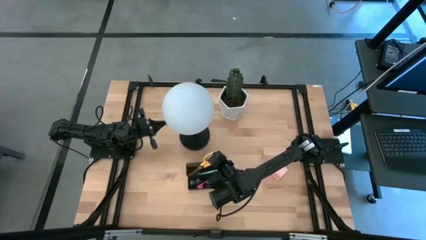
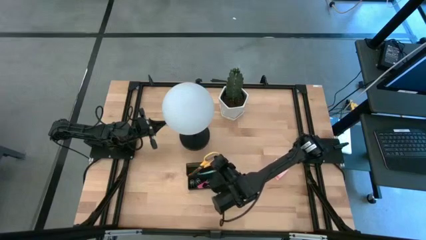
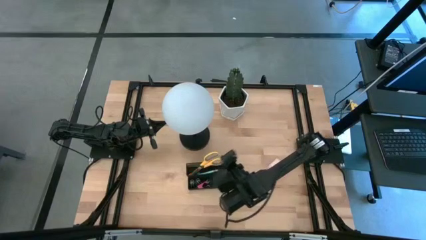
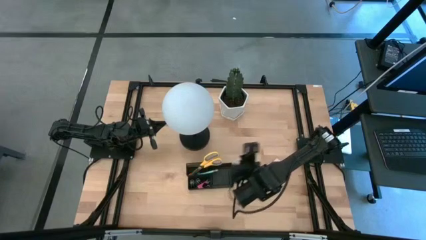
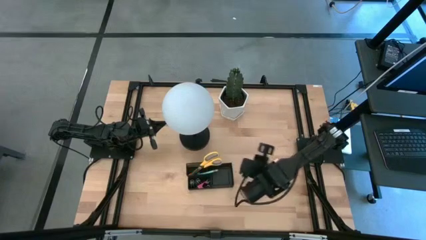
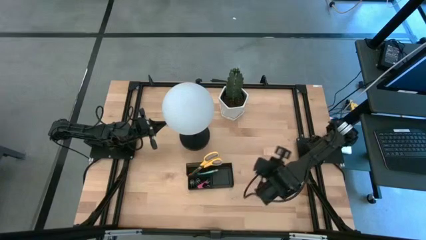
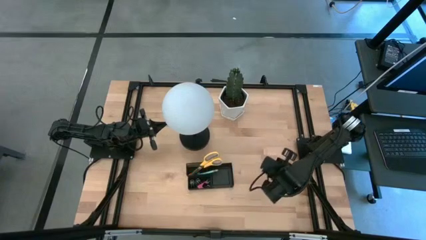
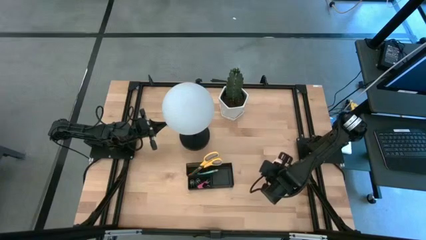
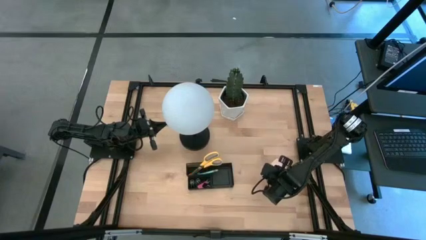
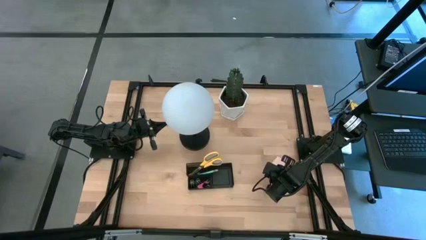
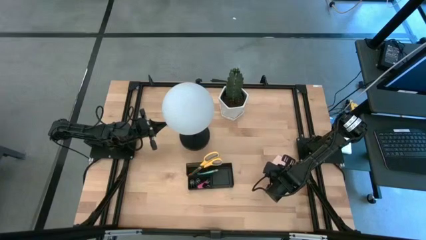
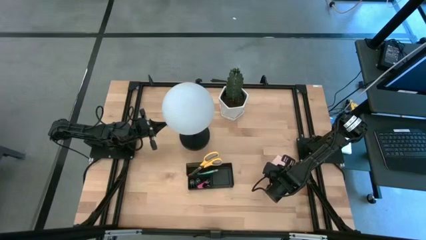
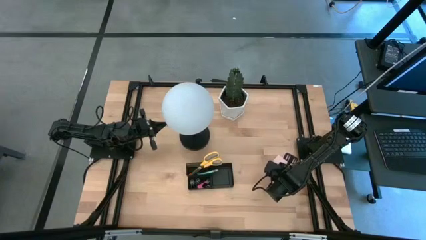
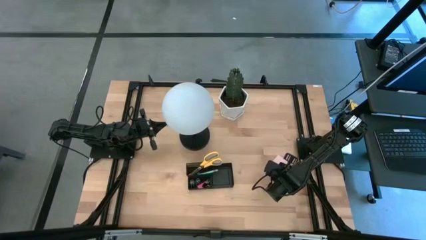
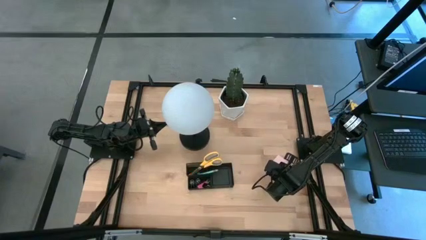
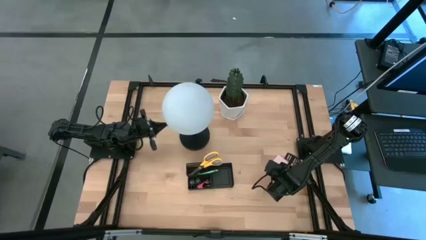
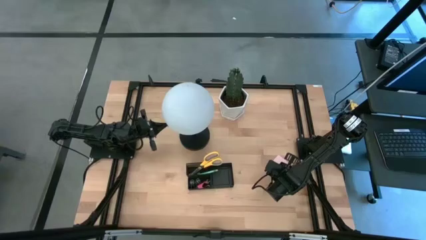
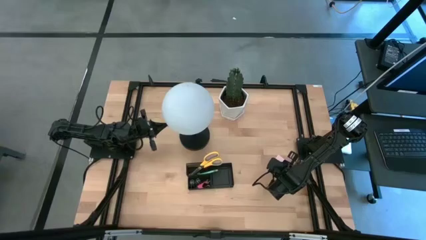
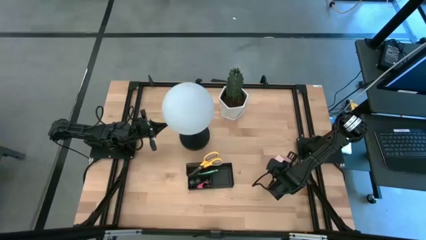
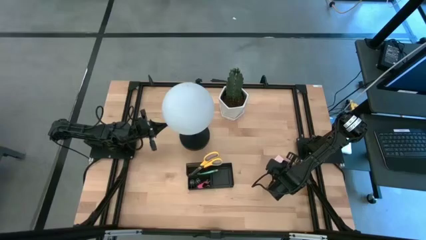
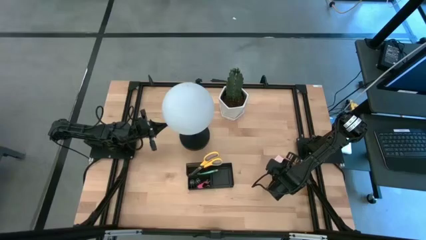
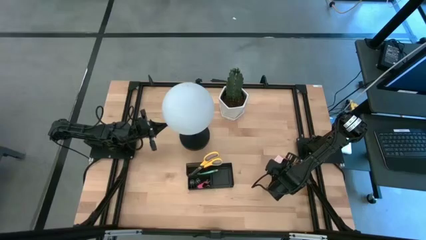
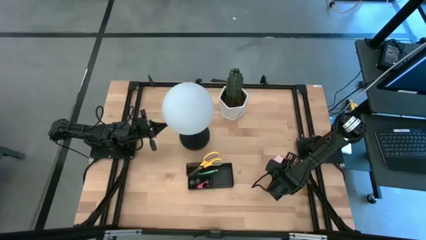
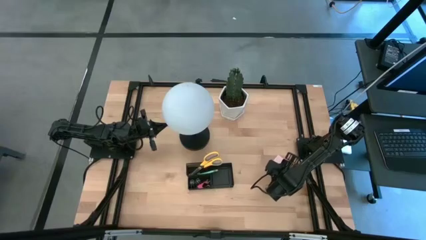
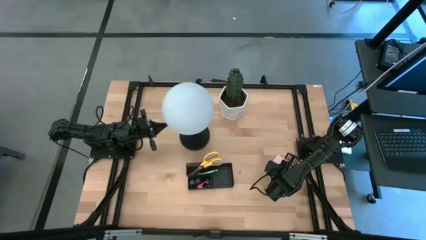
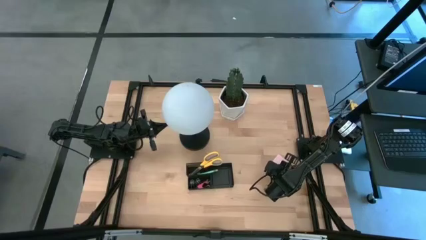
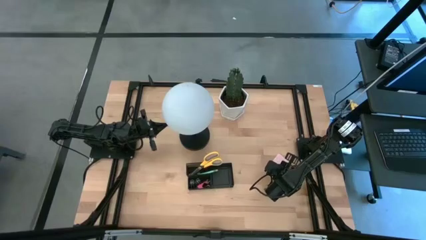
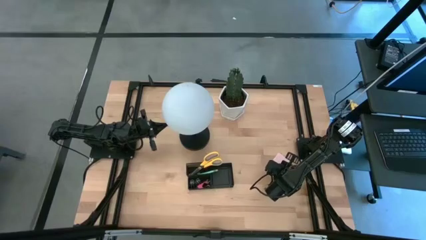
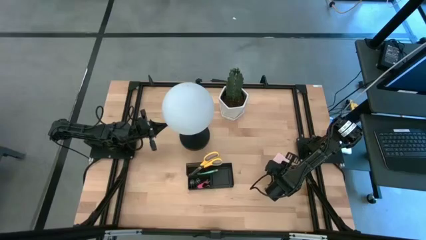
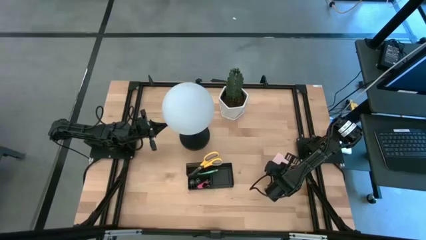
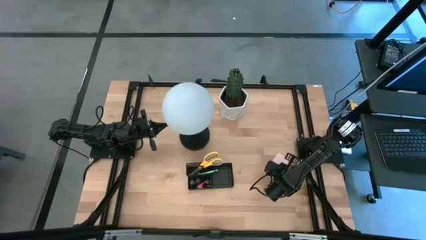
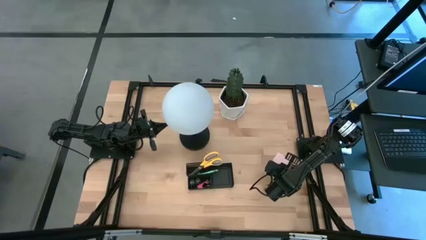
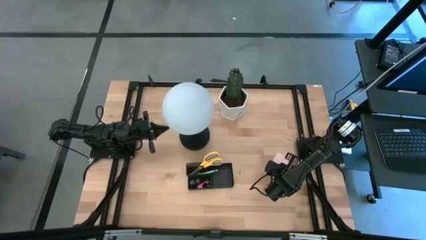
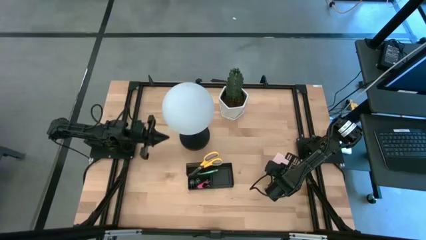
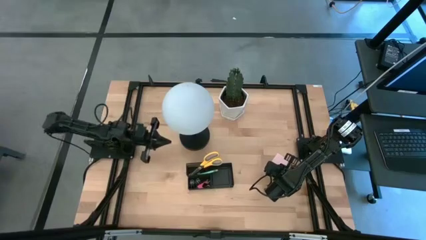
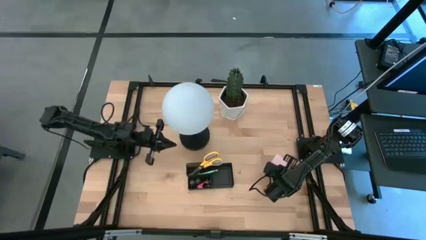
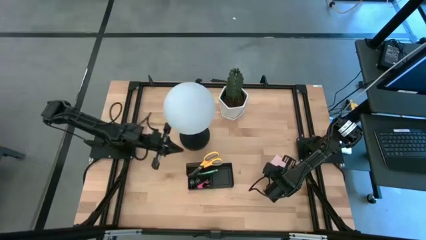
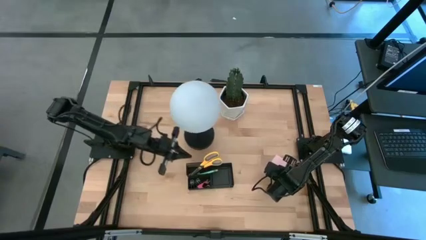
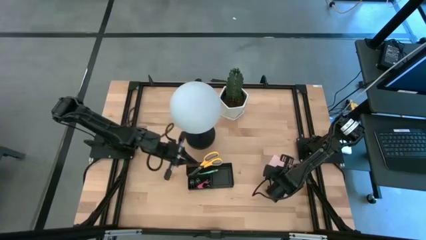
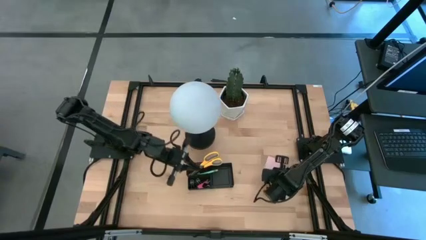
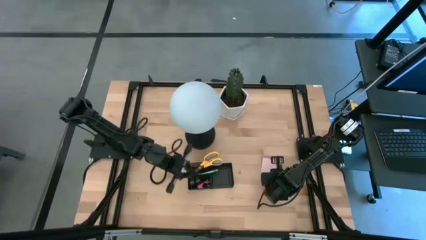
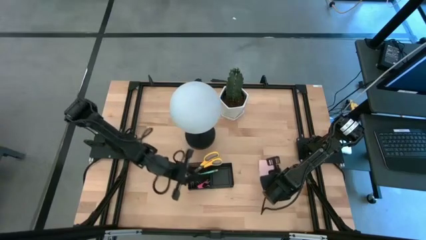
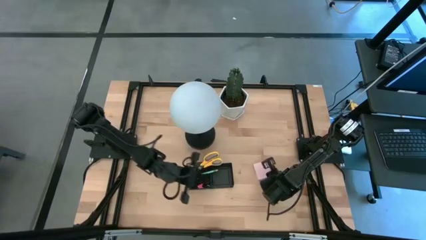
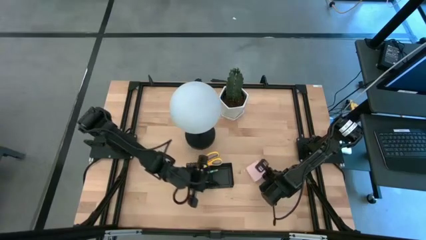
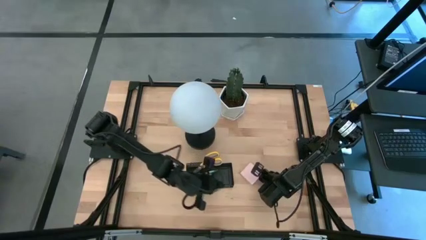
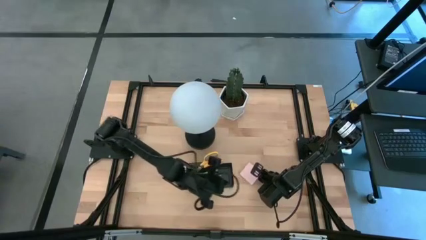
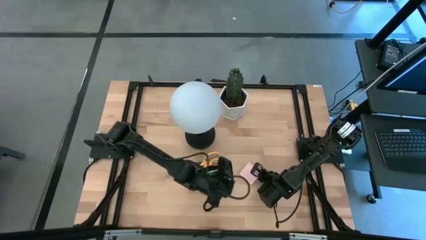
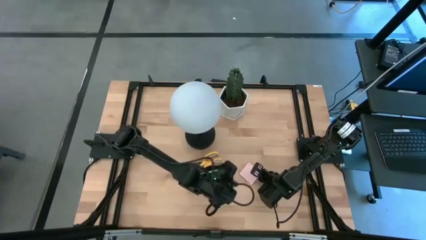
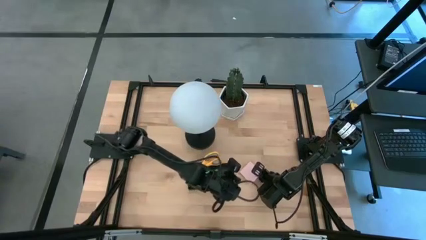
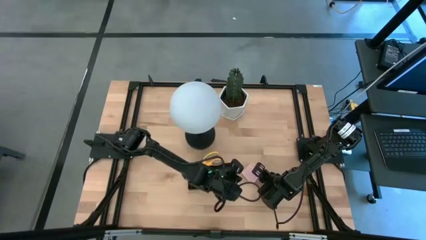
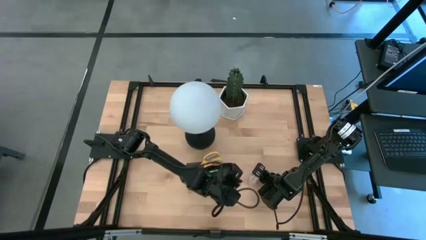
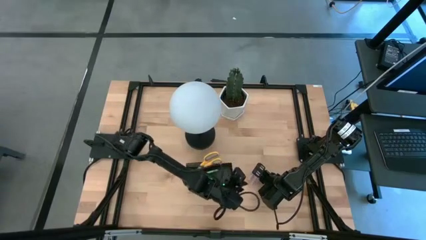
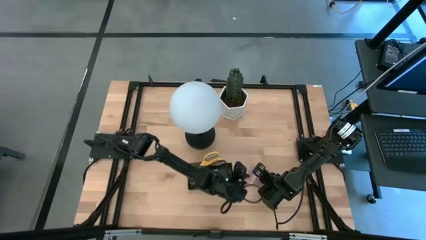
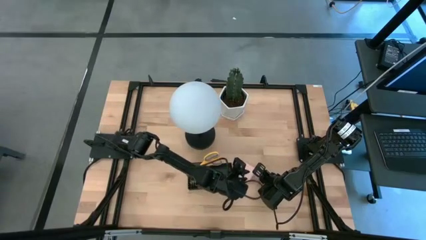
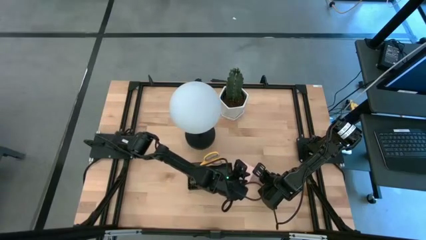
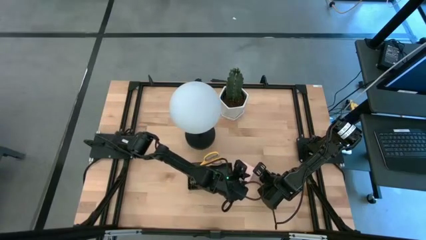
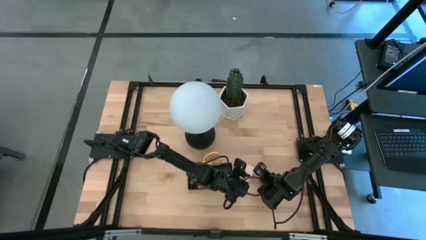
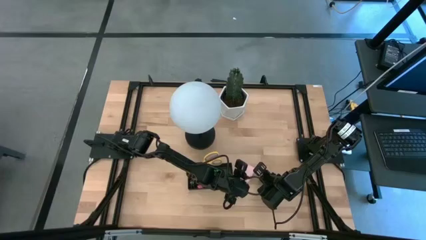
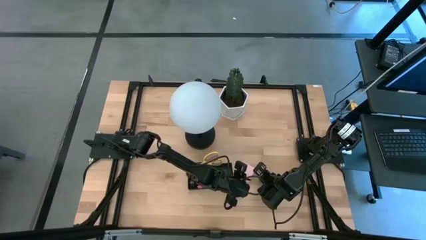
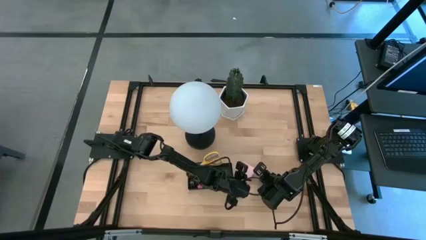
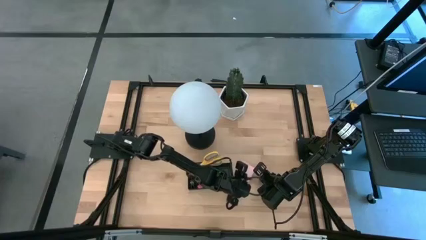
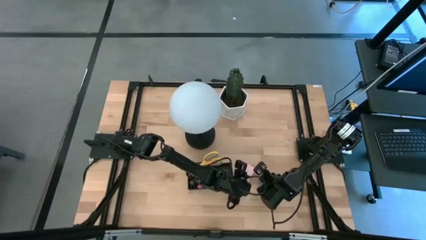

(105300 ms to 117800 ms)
Task: Pick and place office supplies into organizer
Put the pink sticky notes into the desk organizer
